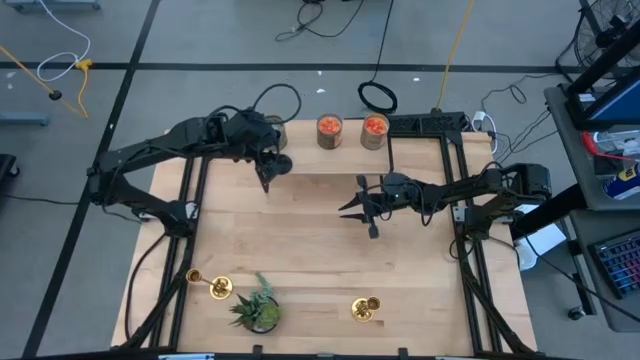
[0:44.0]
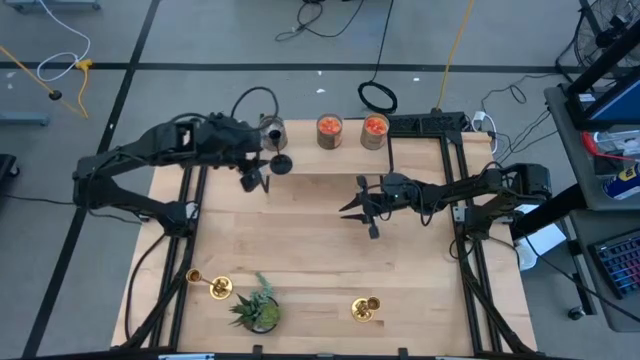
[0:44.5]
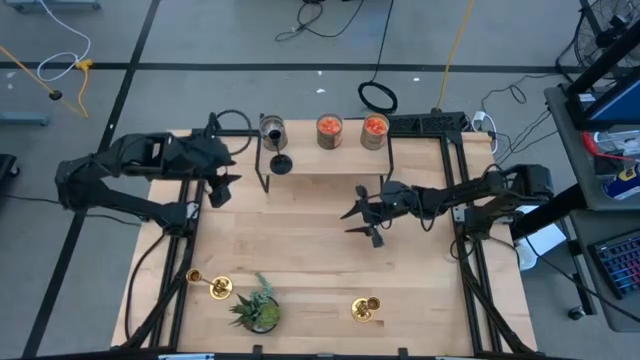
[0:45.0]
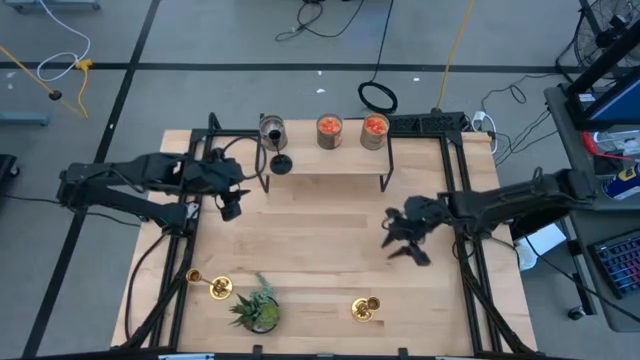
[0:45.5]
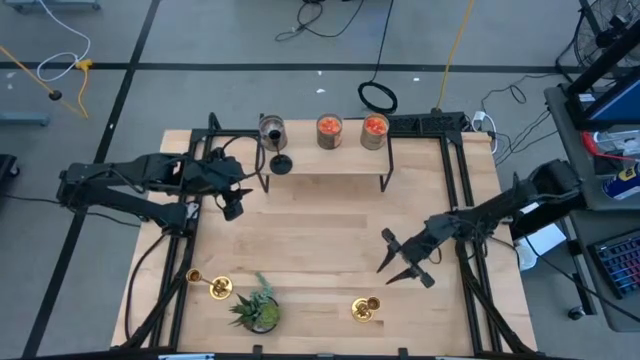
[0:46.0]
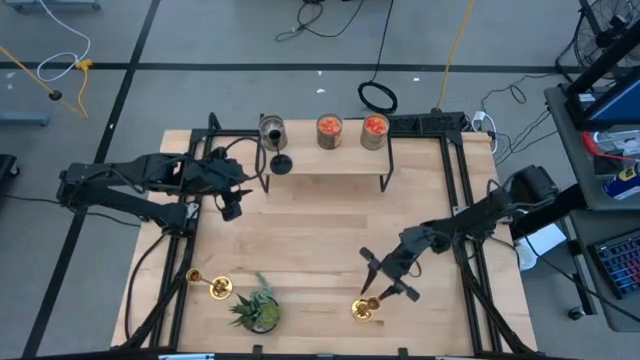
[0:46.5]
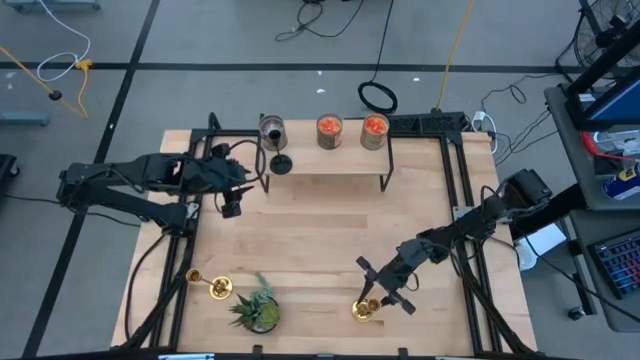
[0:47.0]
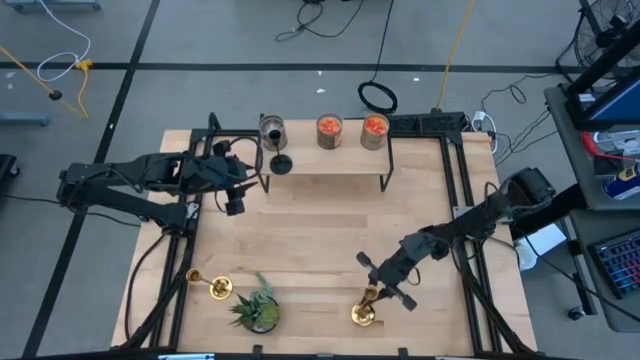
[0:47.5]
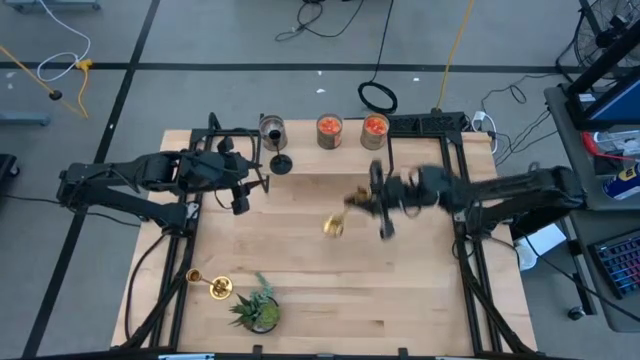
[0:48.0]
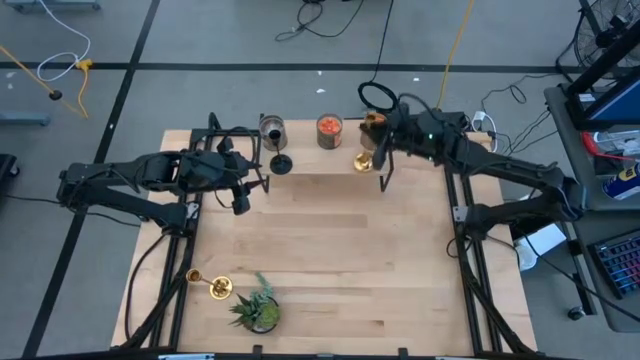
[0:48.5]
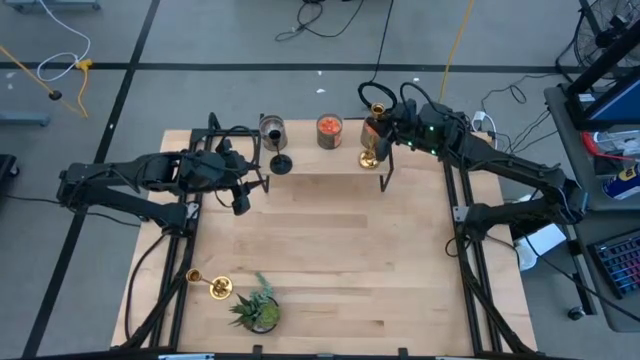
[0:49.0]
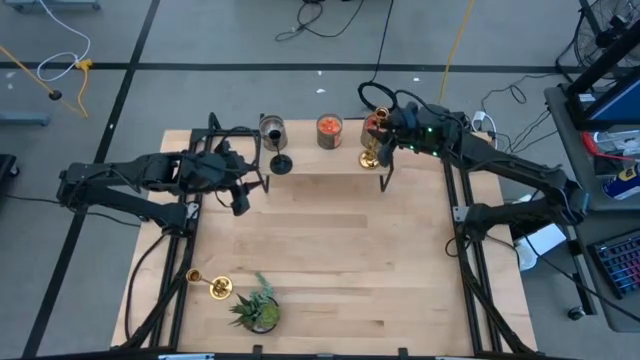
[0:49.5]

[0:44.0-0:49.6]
Task: Pick & Place candle stick holders
Put the right golden candle holder aligned with the brown scented candle on the shelf

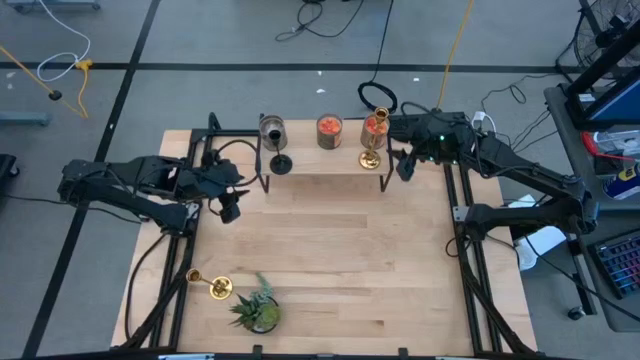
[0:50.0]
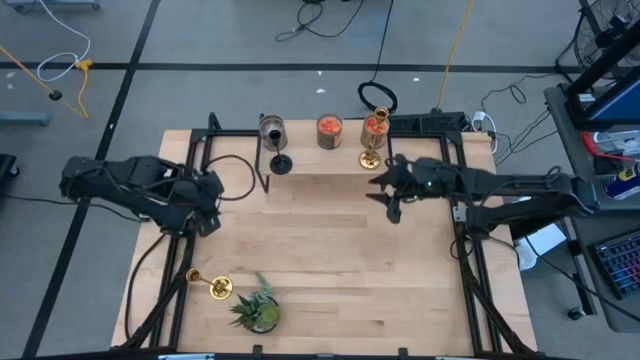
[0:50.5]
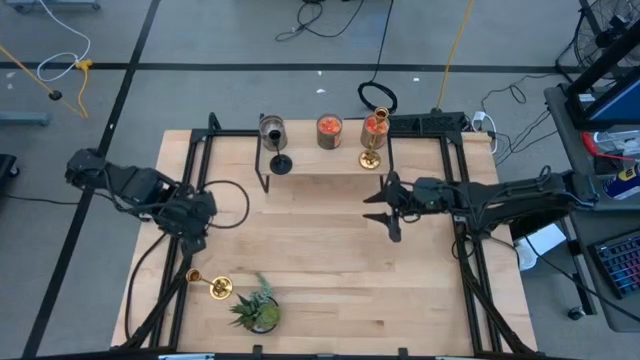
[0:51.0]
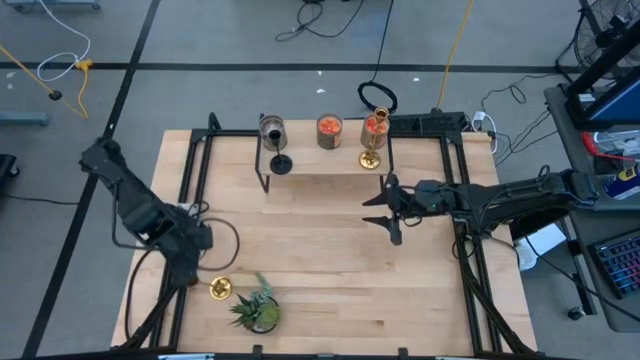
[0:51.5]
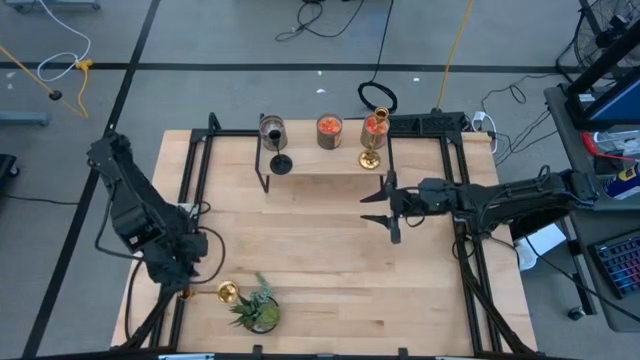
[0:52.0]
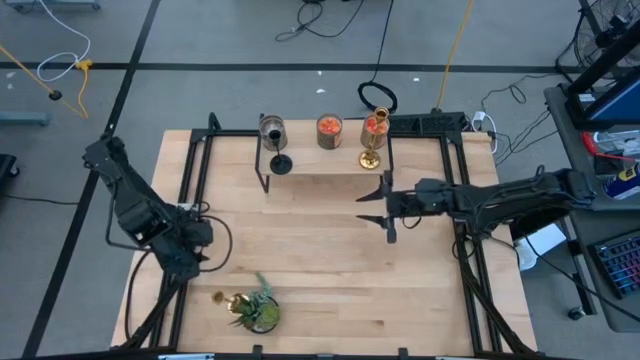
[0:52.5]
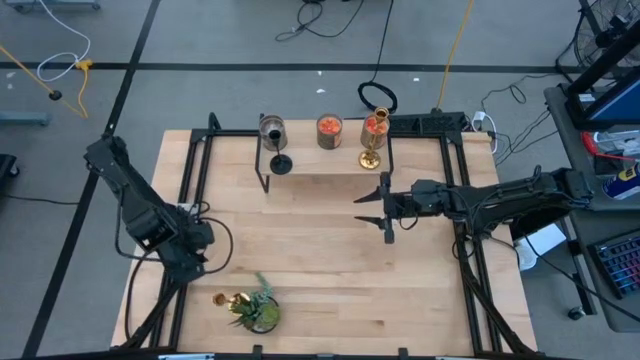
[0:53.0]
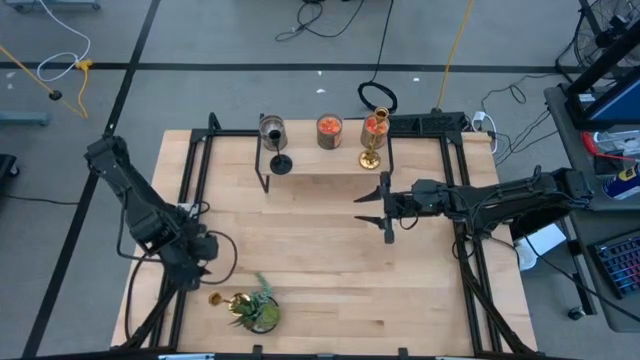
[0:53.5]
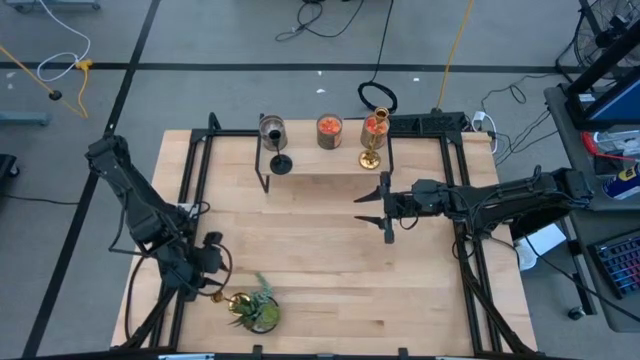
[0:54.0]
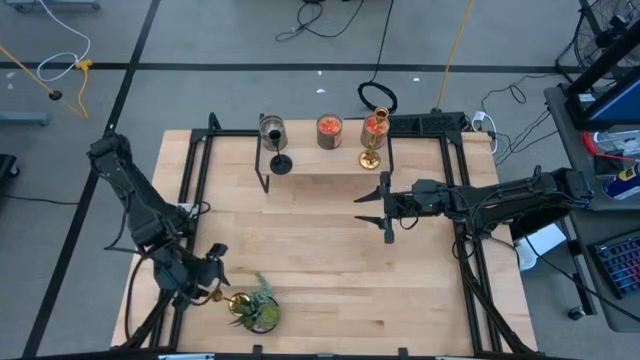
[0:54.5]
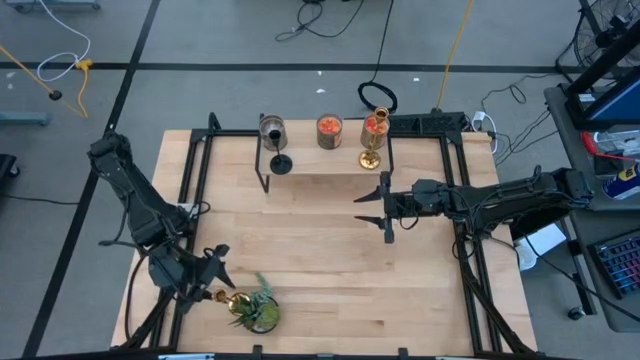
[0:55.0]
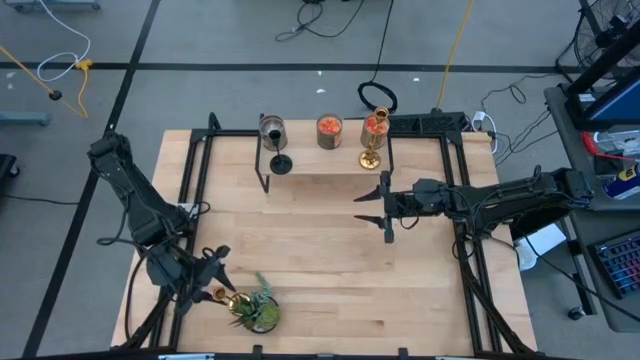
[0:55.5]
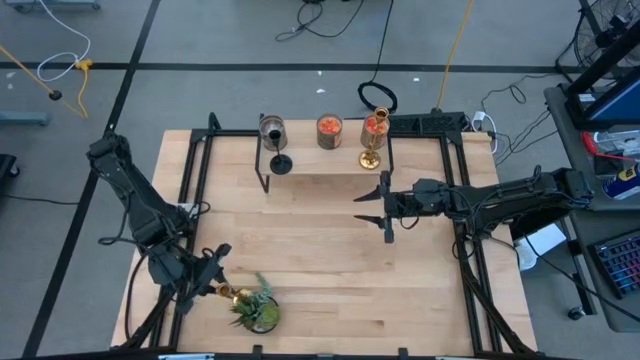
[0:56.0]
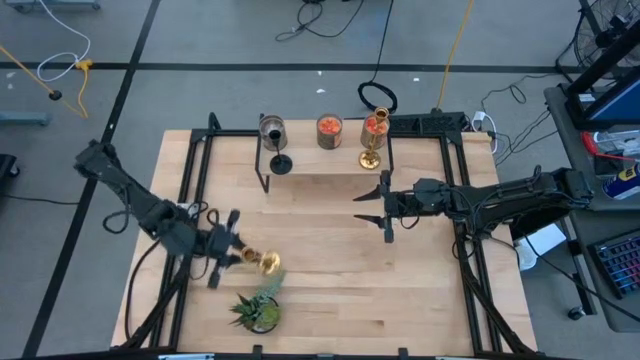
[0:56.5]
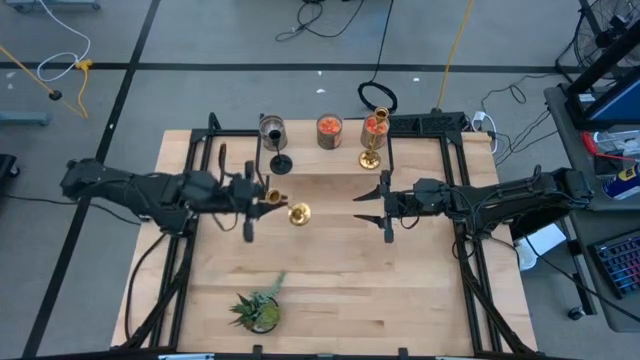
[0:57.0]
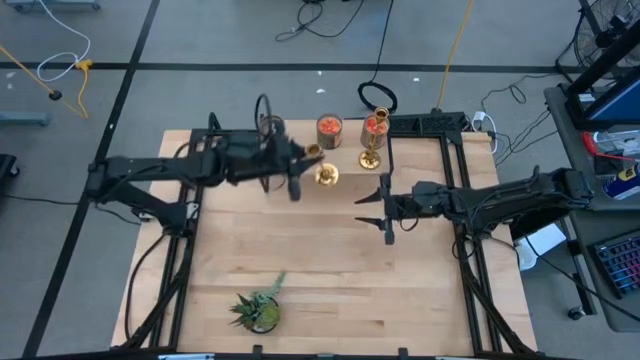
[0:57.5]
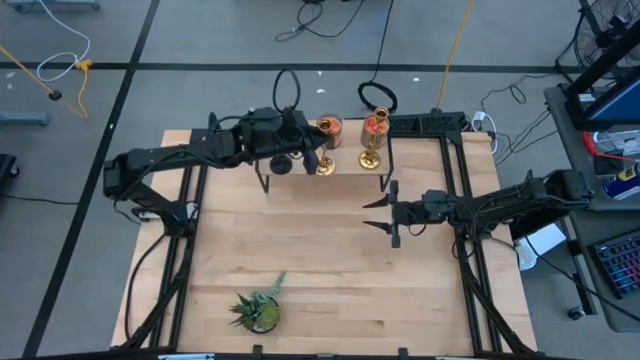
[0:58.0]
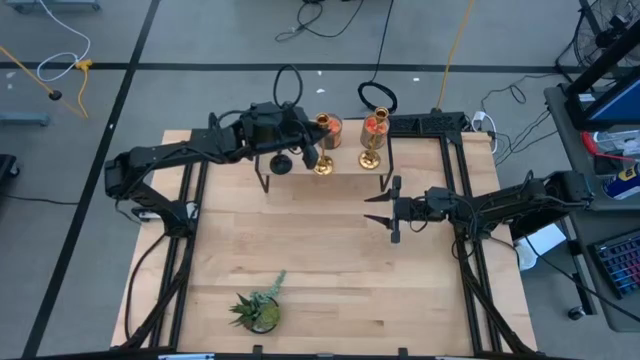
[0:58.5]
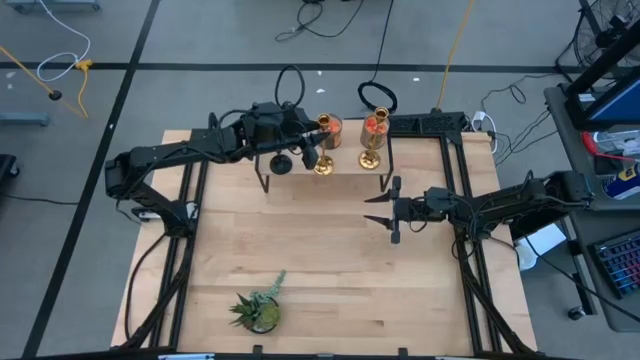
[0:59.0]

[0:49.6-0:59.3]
Put the golden candle holder aligned with the brown scented candle on the shelf

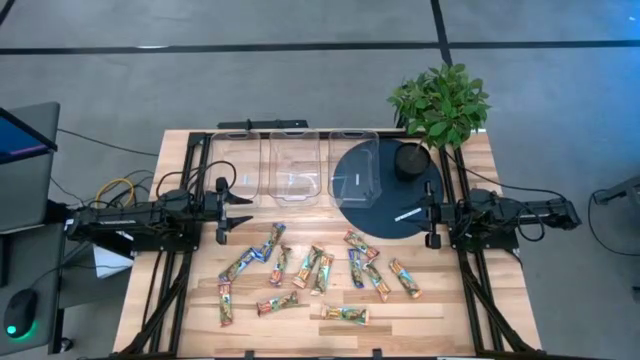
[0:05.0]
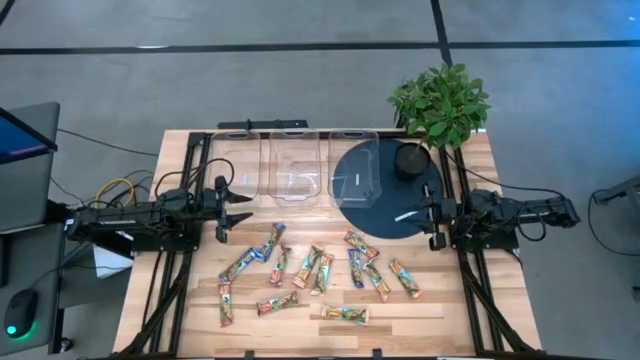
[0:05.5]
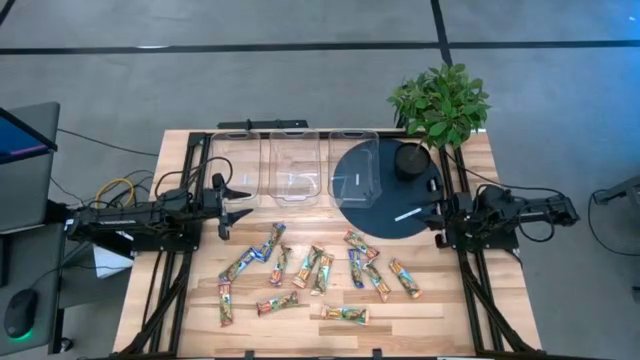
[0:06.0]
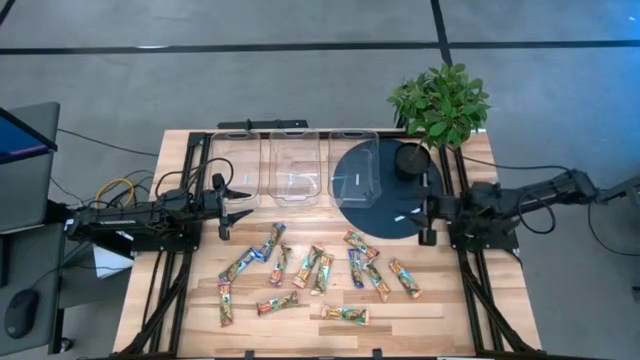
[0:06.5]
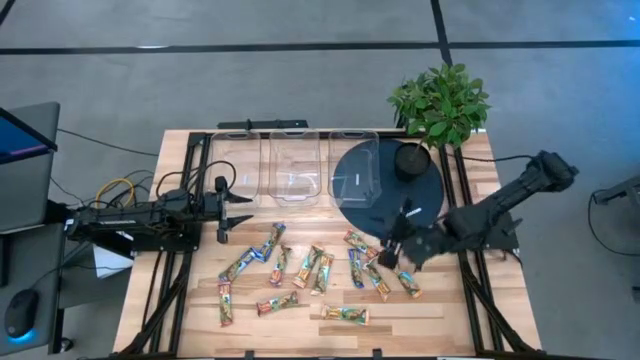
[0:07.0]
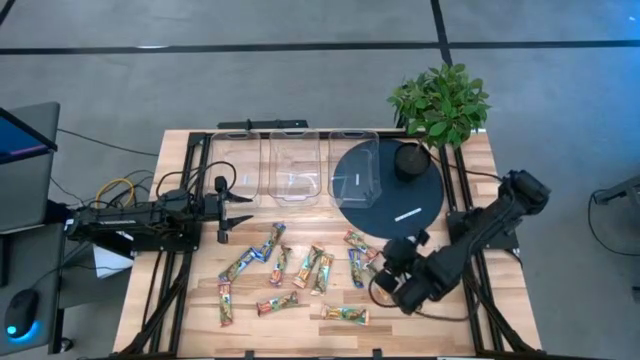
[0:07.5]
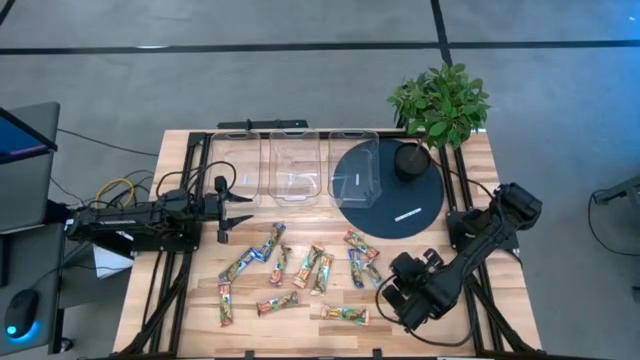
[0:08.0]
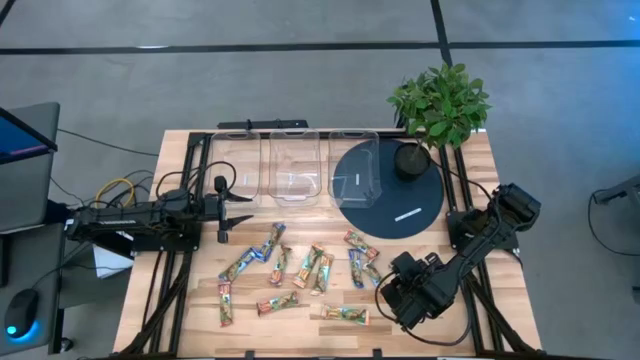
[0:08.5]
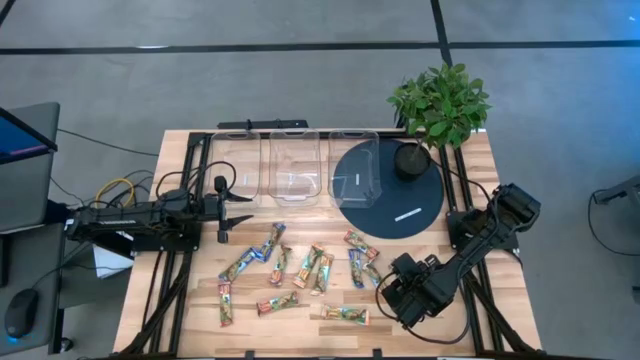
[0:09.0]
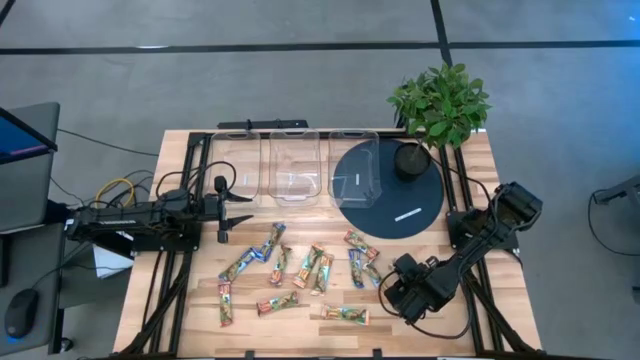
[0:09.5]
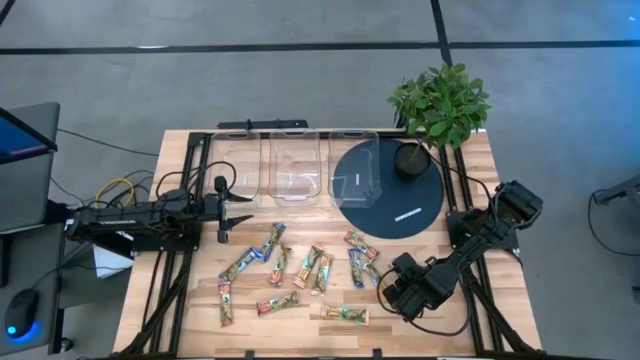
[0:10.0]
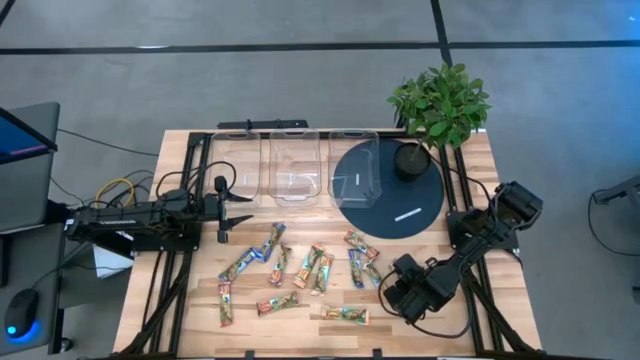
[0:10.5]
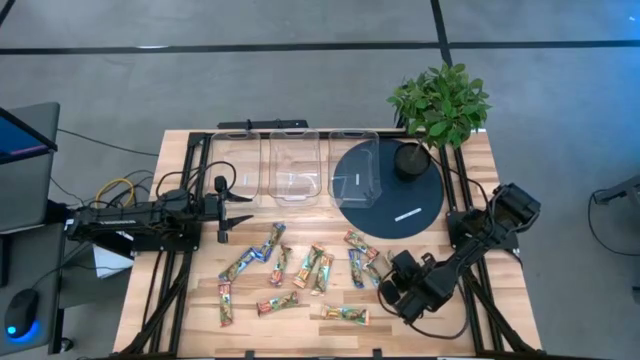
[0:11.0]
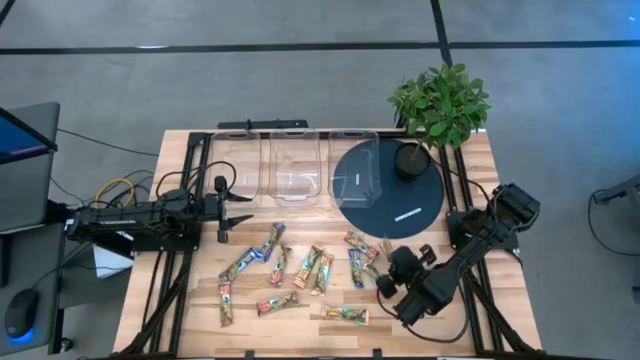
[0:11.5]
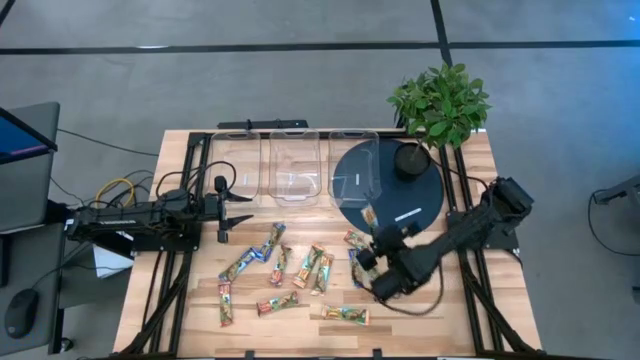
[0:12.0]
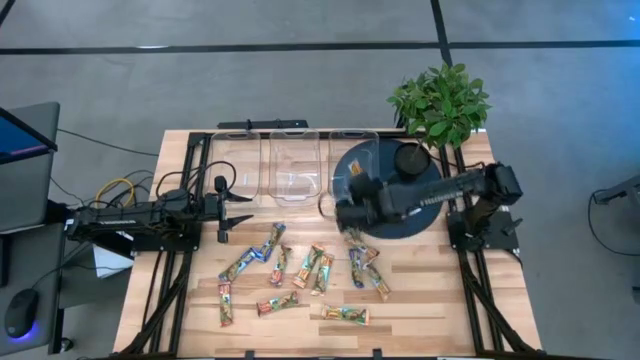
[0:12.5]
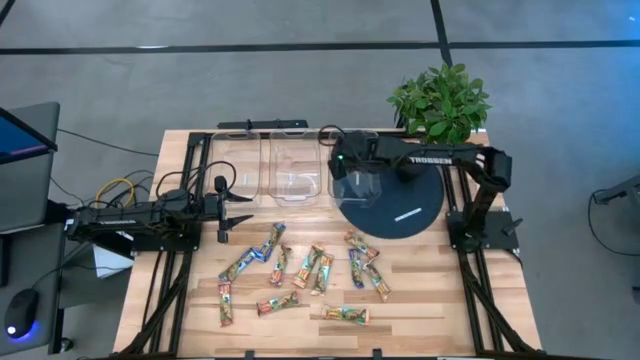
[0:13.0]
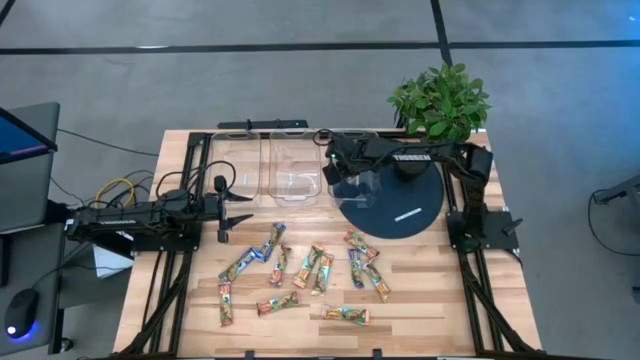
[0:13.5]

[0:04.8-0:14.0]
Task: Pick and place Granola Bars by type
Put the orange chocolate chip into the right transparent bin
